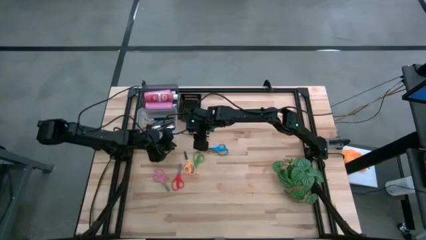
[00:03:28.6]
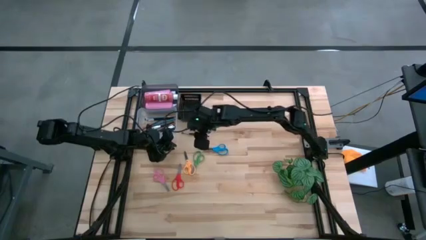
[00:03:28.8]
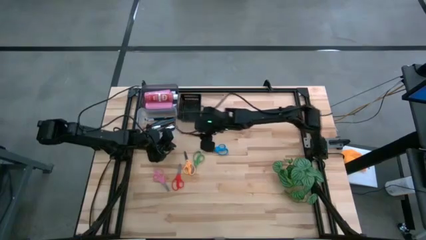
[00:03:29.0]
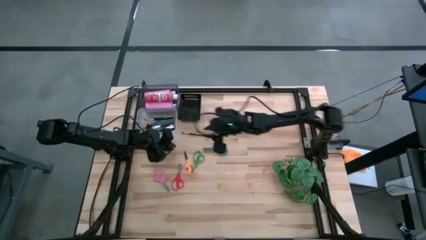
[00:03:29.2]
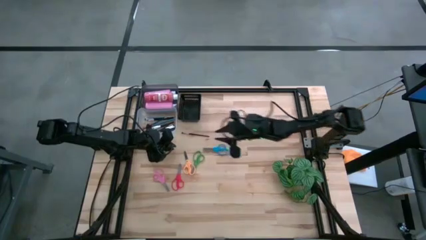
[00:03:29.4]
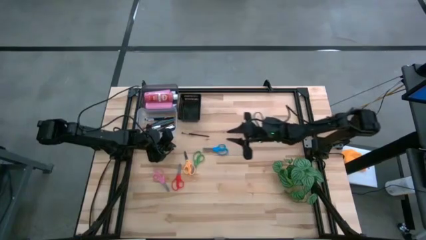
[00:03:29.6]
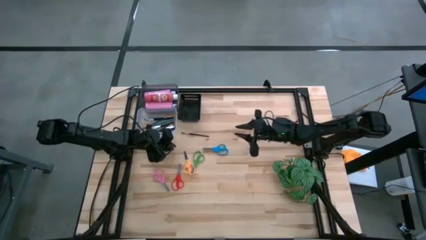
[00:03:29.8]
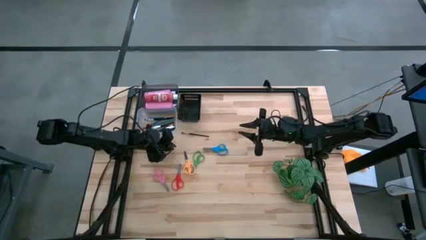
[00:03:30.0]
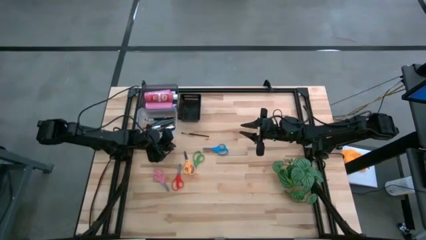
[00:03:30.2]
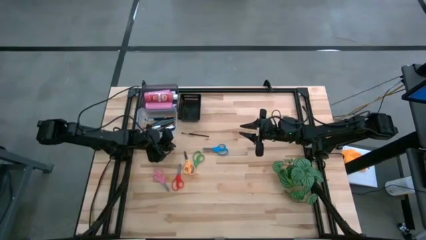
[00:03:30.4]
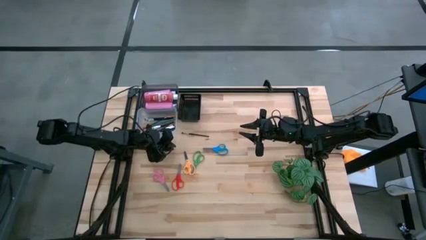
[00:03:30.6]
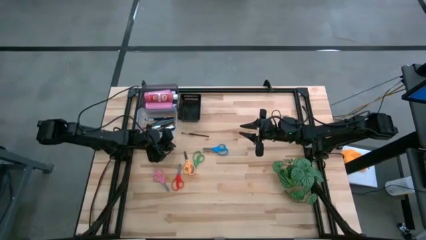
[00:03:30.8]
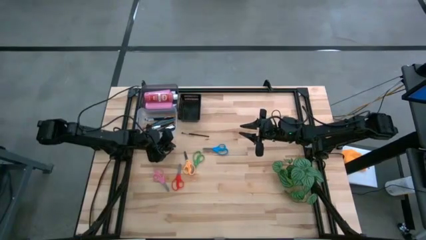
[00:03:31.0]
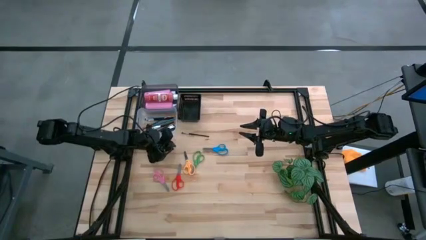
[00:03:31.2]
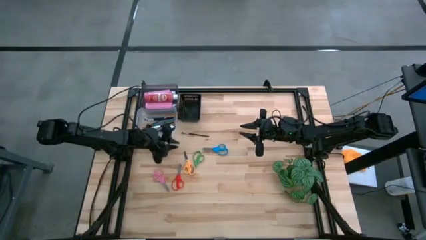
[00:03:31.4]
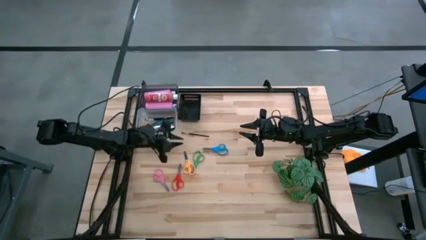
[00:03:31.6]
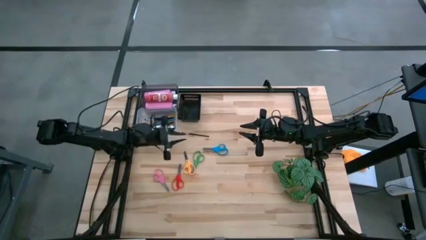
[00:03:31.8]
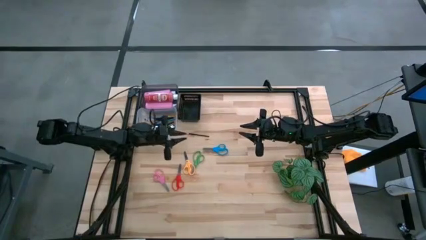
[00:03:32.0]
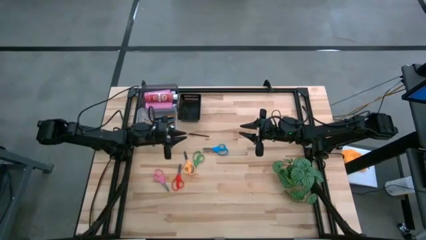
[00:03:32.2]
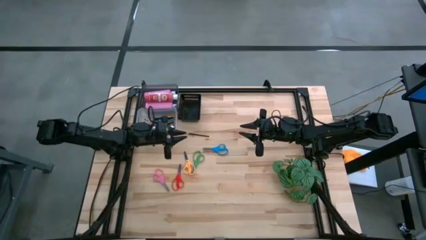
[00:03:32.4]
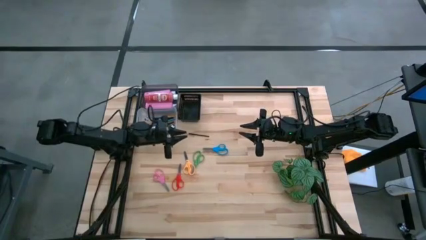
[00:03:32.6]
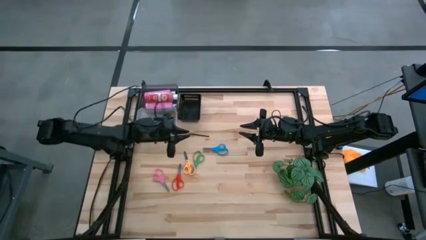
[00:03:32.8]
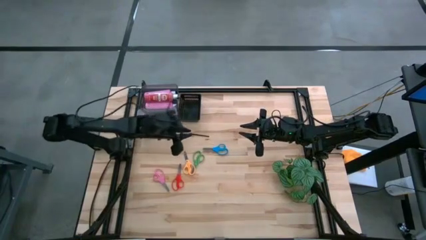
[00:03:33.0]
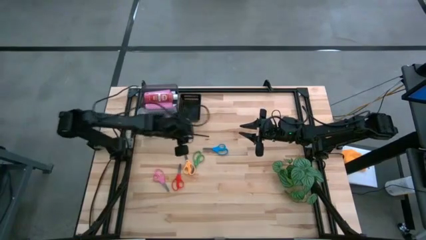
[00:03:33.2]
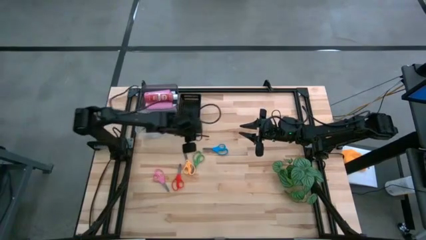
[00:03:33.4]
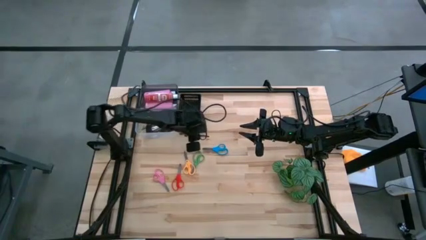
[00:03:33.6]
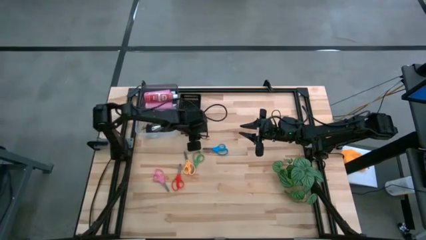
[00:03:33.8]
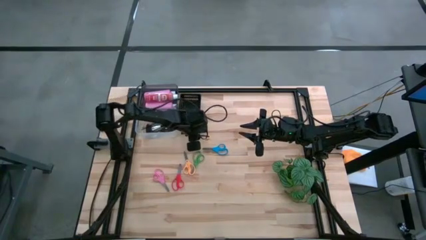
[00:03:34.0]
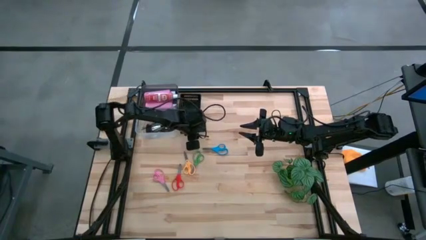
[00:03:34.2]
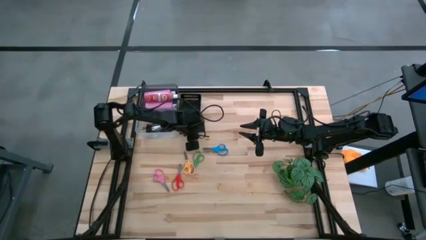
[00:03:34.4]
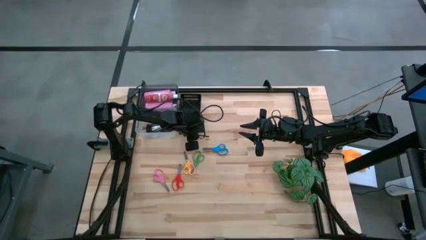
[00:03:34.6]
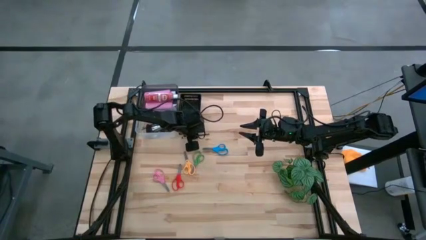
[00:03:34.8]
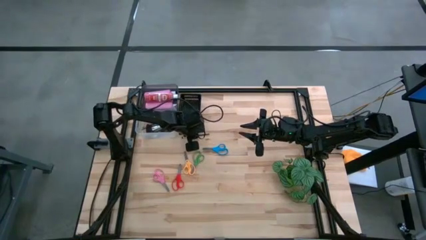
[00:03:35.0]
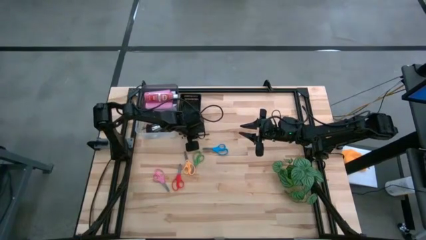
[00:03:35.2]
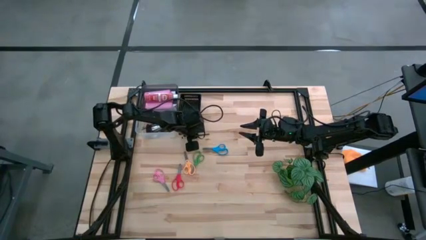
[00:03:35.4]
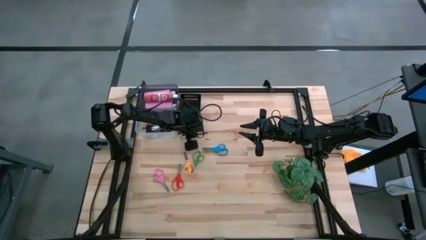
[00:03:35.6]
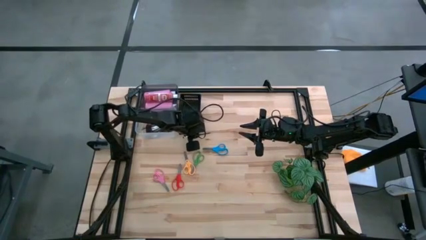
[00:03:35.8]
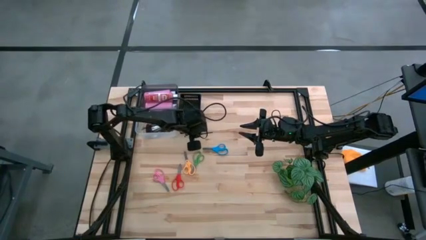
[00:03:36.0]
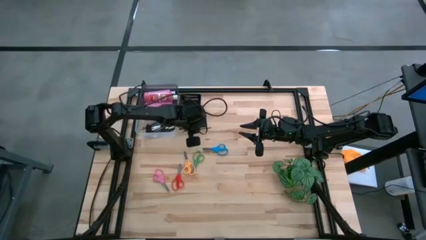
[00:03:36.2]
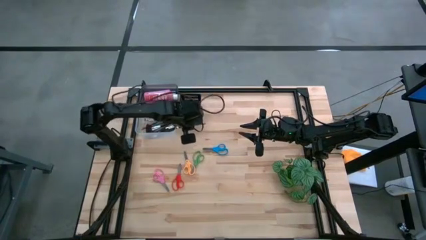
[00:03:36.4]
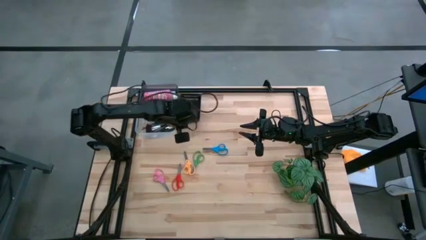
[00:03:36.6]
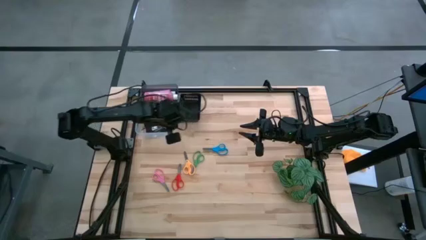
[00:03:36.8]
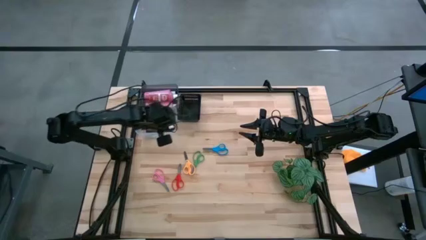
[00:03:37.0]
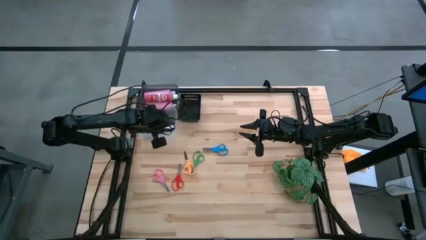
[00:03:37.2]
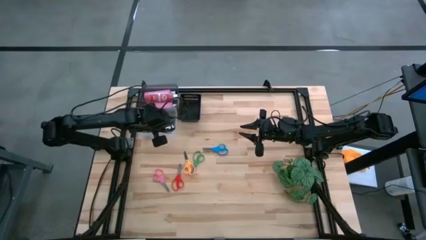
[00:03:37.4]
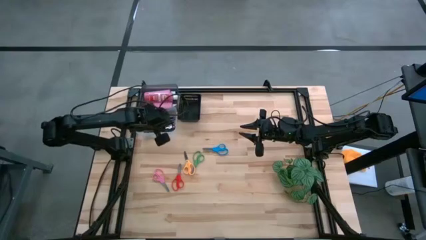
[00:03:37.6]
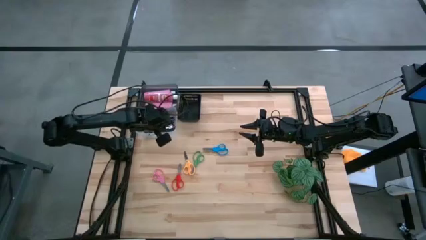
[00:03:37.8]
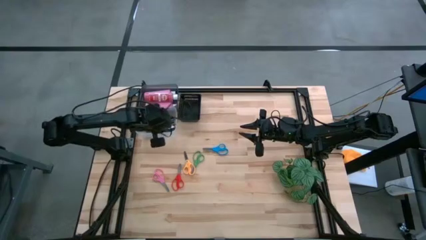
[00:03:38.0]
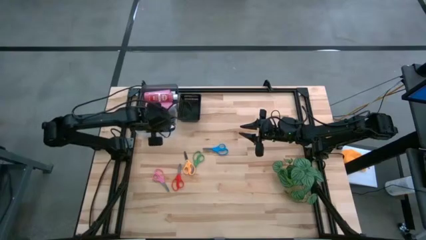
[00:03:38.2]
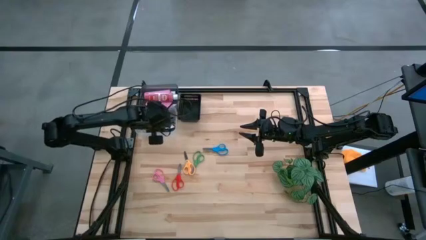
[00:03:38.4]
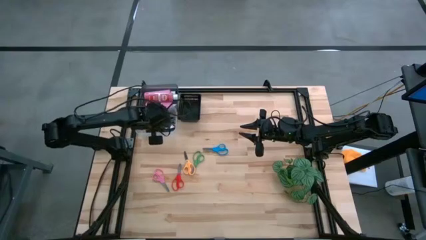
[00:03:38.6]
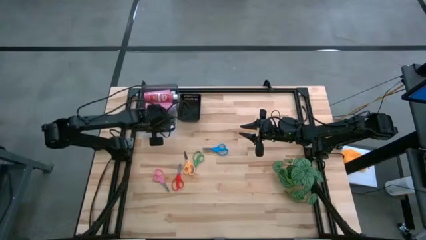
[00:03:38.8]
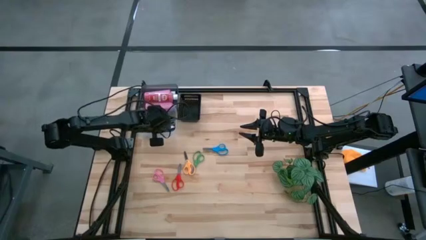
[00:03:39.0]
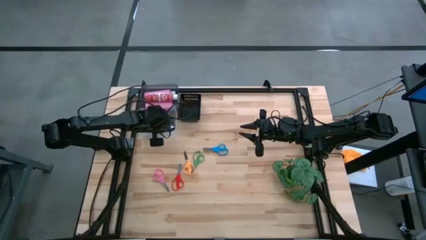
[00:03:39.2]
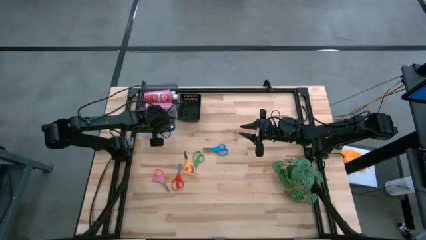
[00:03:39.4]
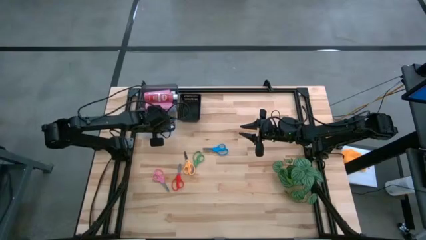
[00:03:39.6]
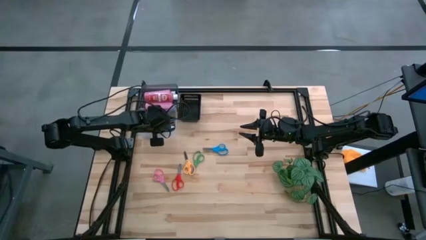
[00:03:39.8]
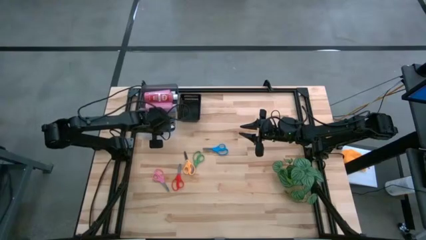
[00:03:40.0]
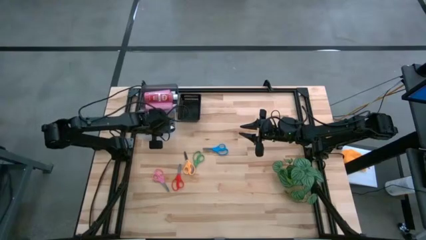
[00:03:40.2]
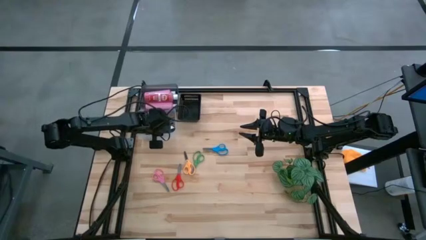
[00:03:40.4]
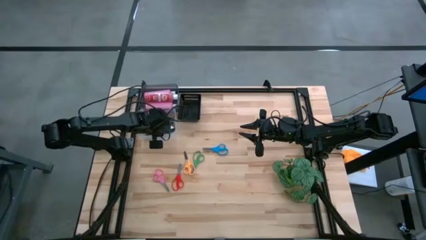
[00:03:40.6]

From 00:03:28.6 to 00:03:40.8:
Task: Pick & Place Paint Supplies
Put the black paint brush into the transparent bin

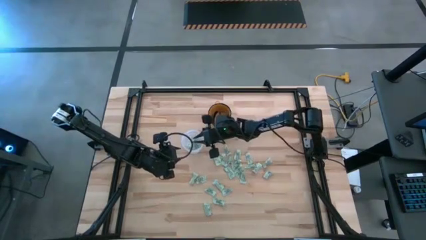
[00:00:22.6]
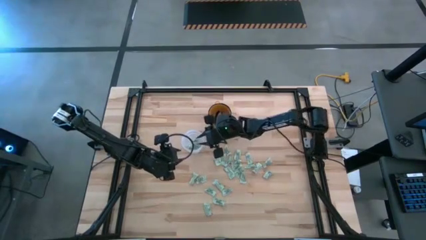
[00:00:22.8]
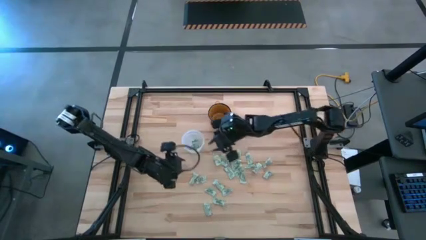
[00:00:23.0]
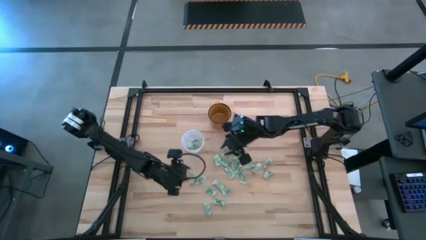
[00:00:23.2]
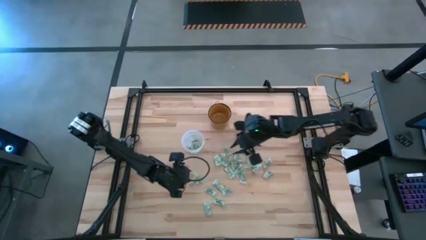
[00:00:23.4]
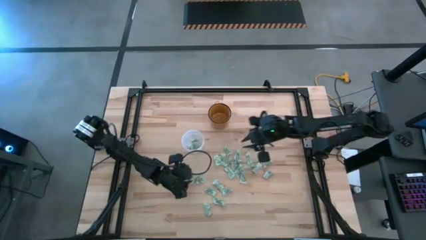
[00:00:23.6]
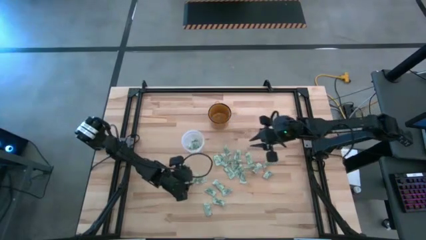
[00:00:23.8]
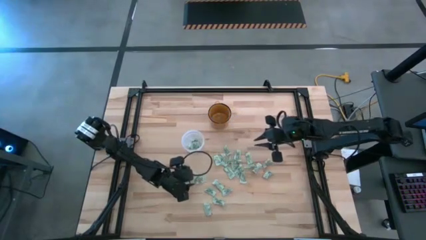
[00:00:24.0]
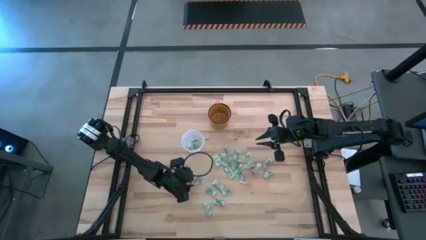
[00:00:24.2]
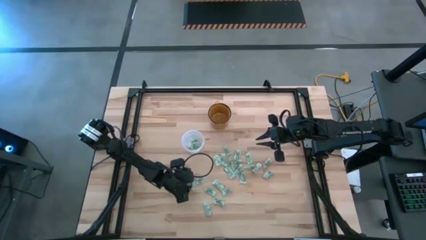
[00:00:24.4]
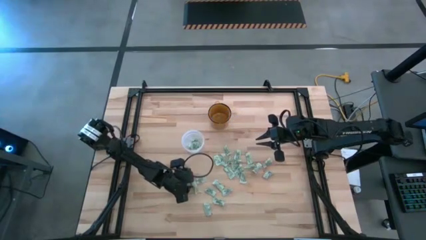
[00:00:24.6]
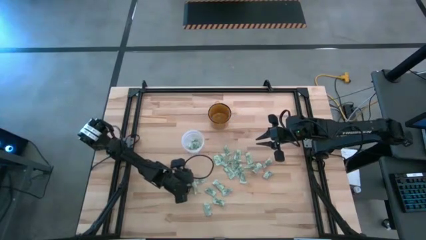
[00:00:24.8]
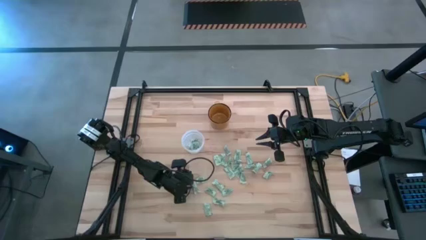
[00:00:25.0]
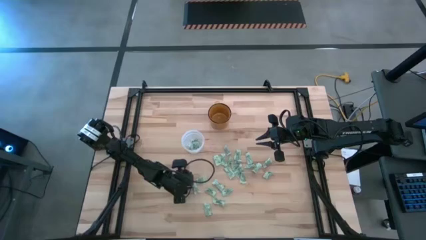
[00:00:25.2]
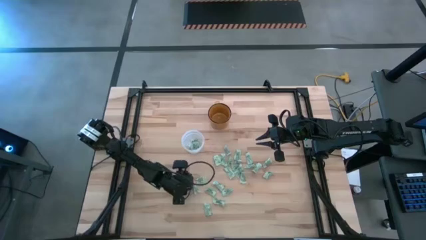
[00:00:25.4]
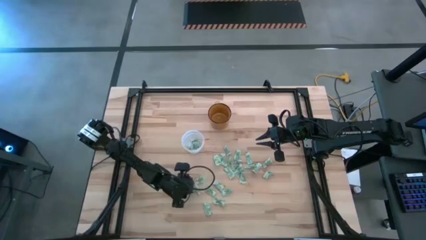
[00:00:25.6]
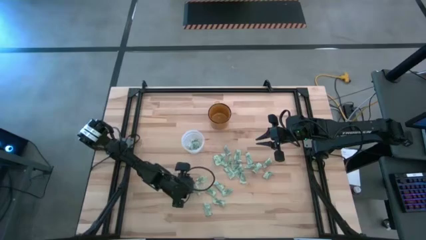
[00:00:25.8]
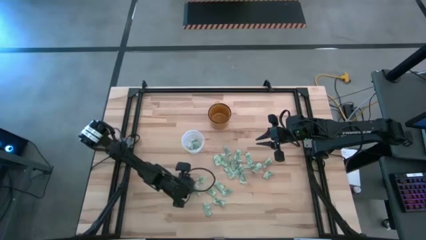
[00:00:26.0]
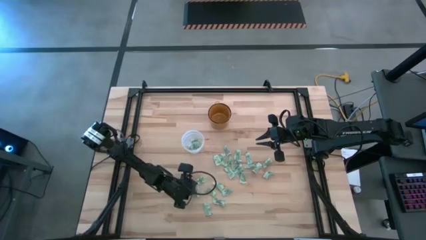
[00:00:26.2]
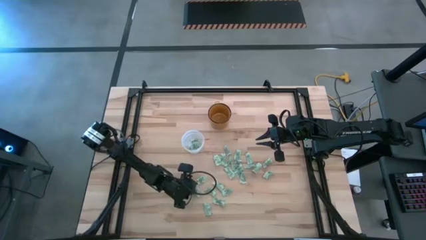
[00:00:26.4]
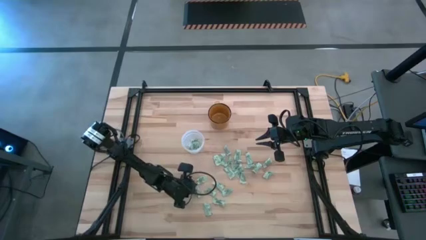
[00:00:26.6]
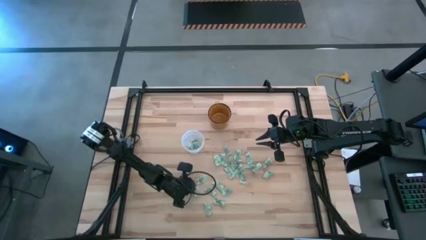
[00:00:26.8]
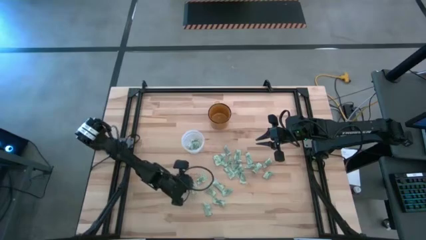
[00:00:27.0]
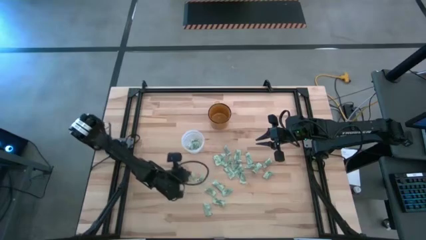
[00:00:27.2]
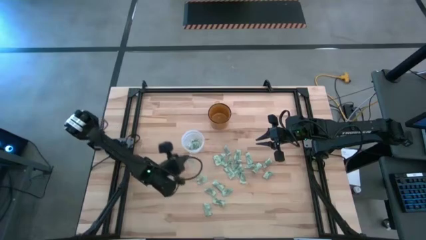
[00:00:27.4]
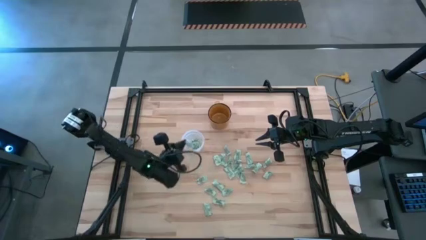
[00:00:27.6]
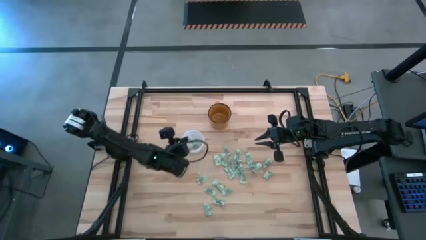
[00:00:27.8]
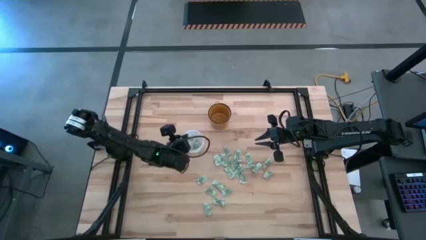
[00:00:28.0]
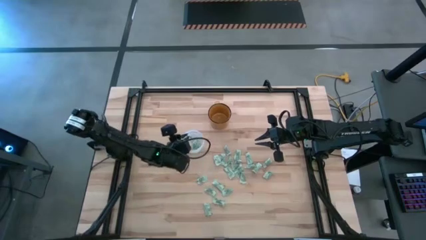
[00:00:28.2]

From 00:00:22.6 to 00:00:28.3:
Task: Pick and place Stevia / Truvia into bins
Put the stevia packet into the transparent bin
